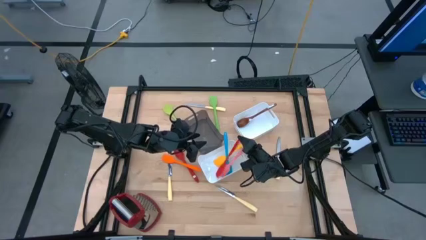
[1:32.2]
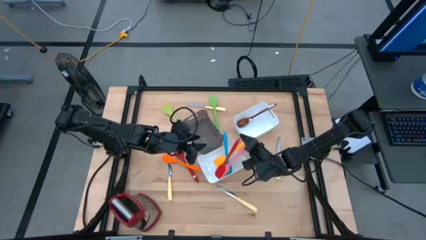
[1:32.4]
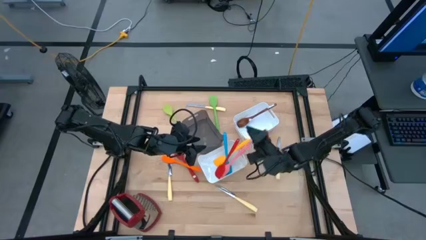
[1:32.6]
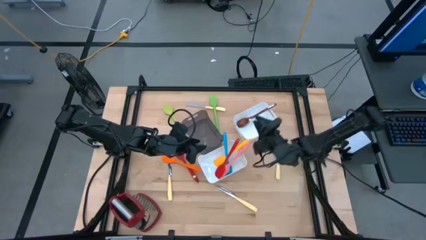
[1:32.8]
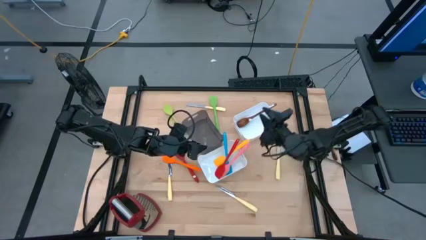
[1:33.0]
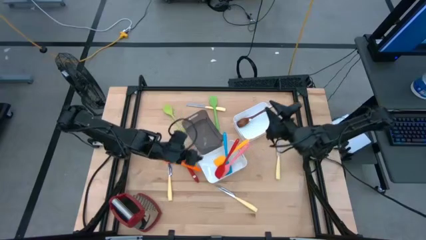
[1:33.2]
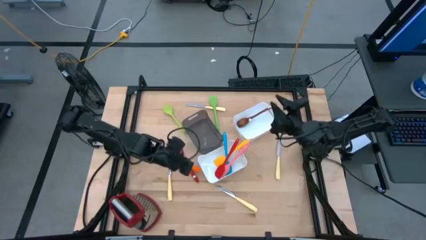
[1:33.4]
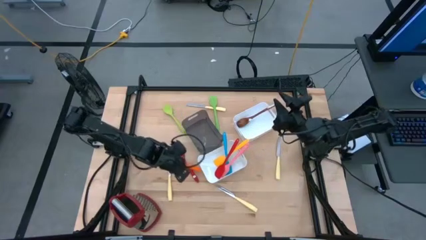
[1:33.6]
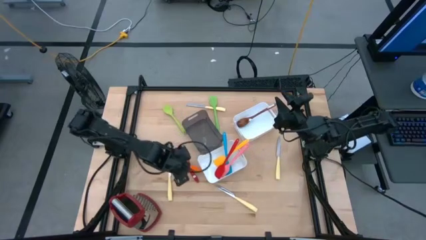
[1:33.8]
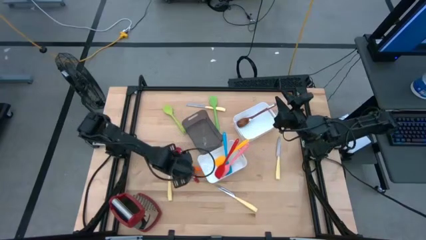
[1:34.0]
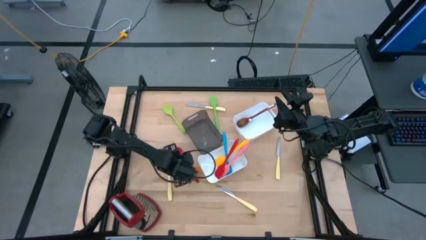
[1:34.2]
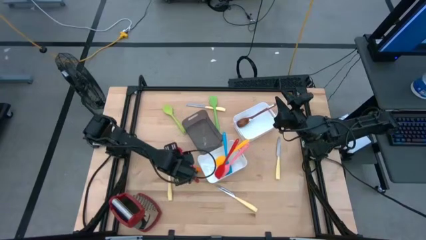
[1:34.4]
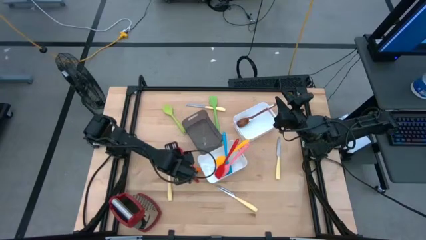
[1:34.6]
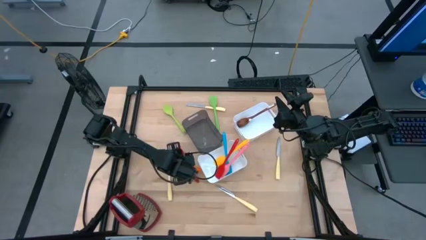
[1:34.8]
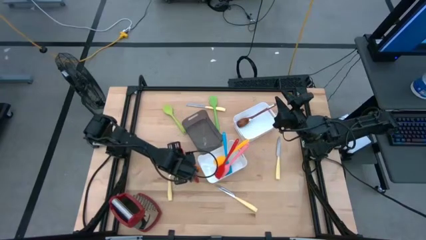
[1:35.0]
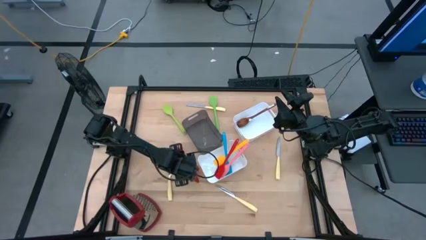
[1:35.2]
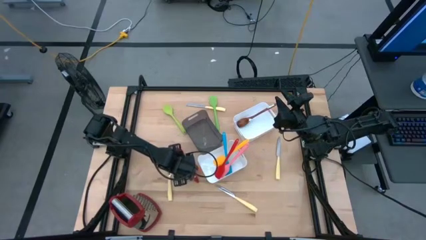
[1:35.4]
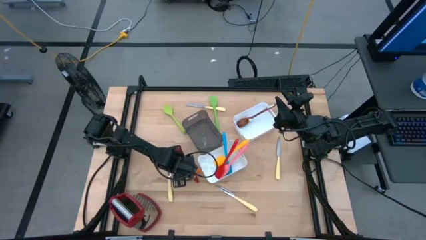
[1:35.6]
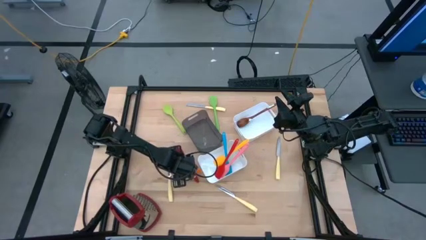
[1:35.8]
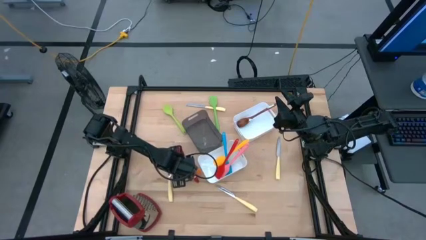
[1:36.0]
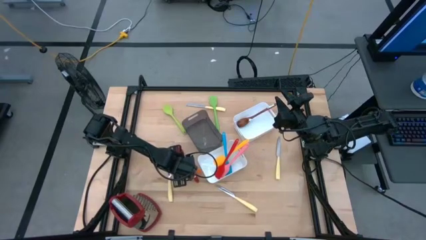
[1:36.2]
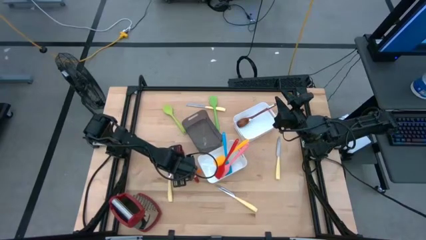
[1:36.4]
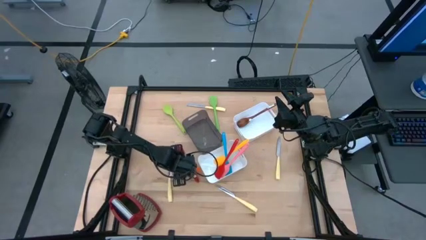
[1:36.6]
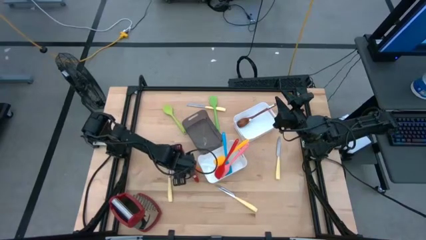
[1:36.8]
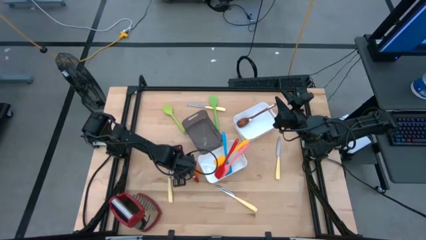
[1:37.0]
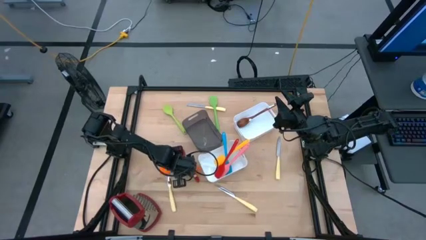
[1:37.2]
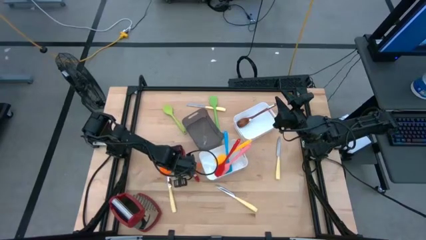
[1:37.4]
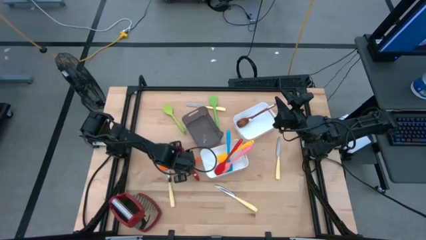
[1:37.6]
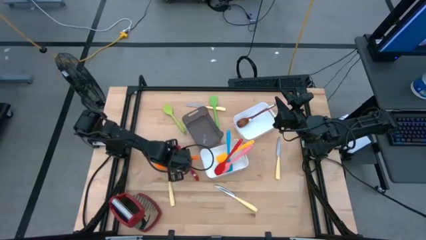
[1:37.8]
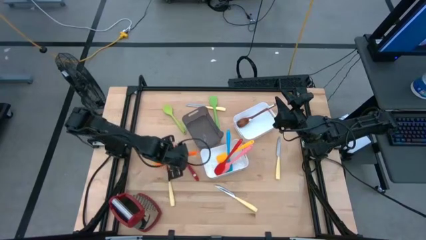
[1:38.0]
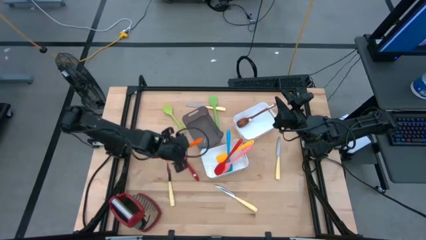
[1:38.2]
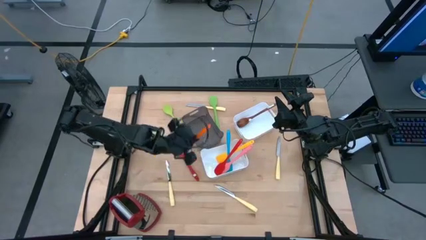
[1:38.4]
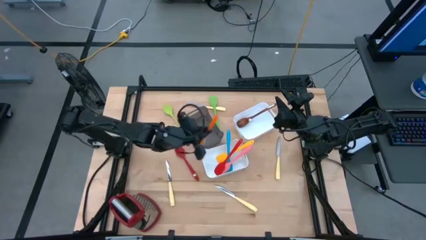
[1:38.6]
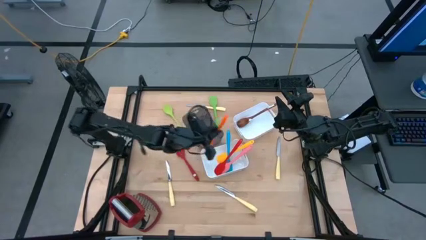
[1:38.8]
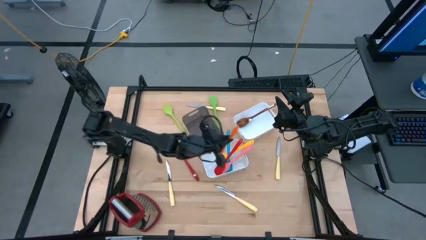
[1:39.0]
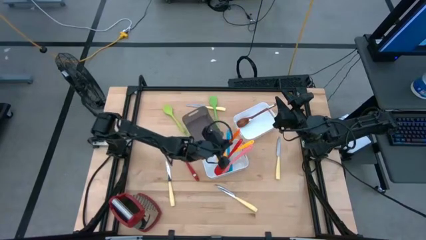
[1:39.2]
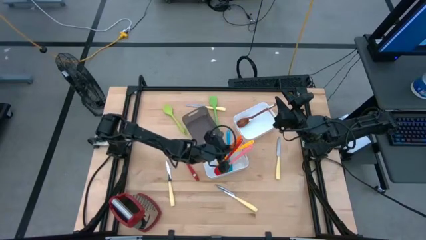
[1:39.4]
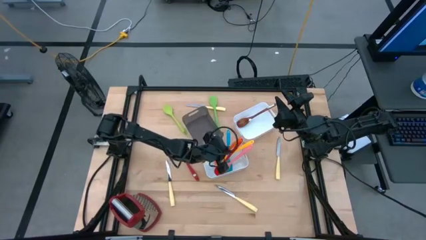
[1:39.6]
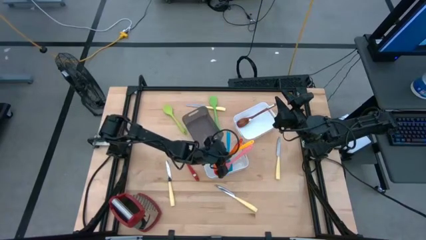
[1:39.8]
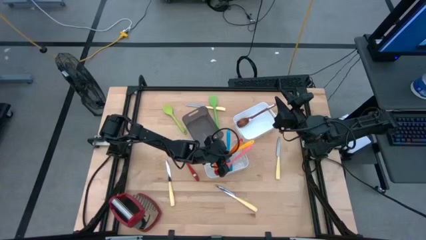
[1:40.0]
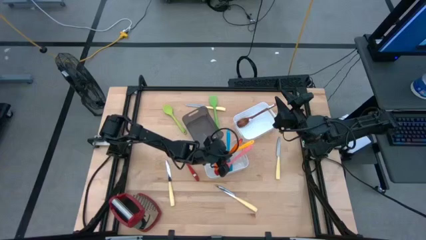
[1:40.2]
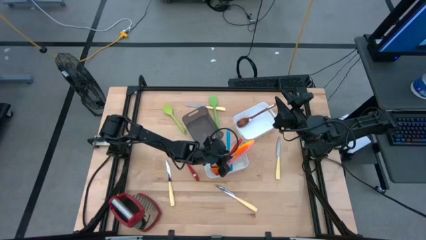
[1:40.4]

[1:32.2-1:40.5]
Task: Pick & Place Kitchen Items
Put the orange spatula into the bottom white bin

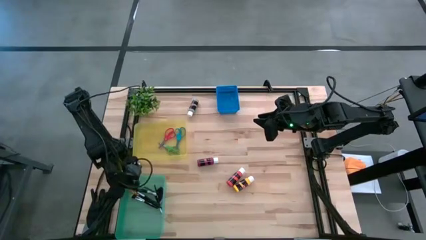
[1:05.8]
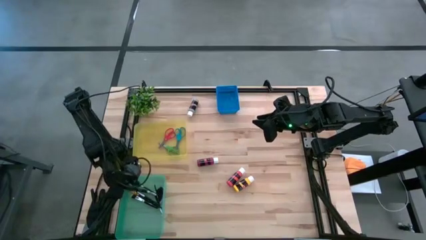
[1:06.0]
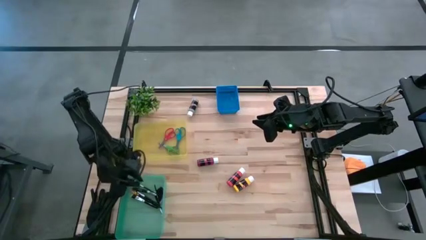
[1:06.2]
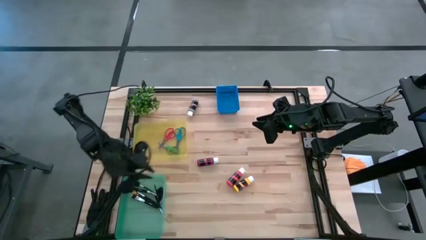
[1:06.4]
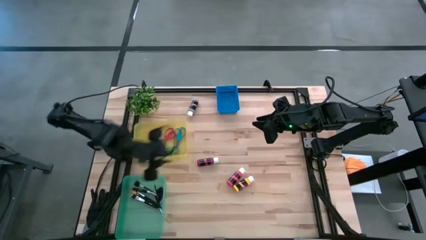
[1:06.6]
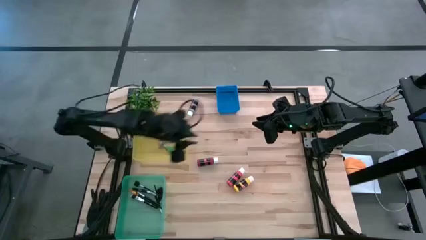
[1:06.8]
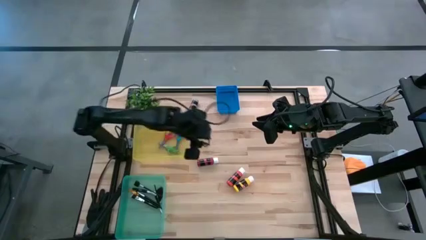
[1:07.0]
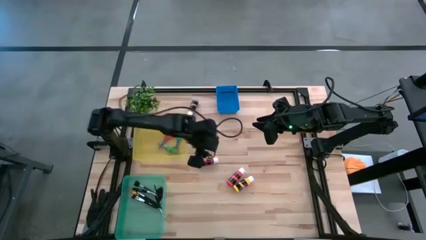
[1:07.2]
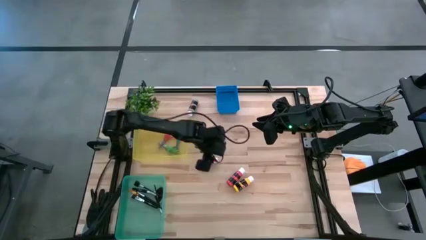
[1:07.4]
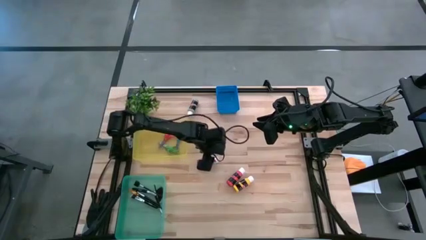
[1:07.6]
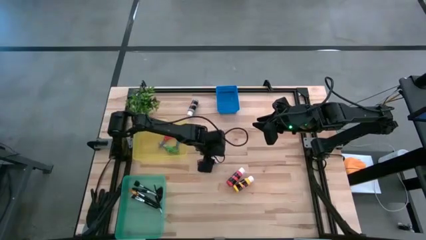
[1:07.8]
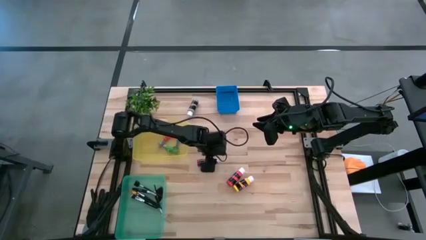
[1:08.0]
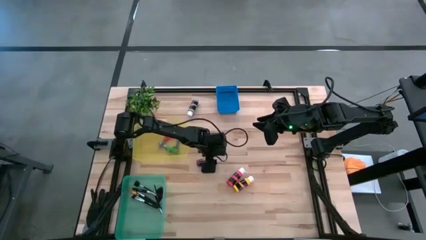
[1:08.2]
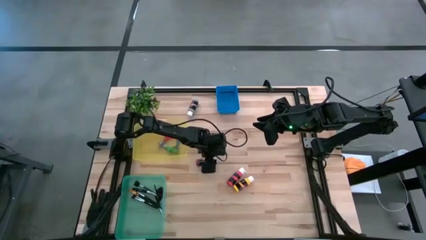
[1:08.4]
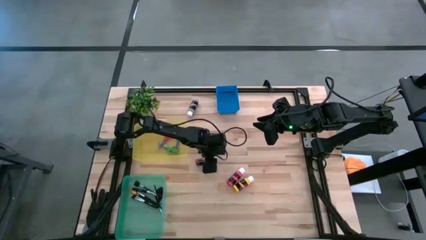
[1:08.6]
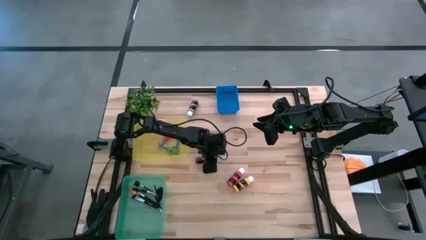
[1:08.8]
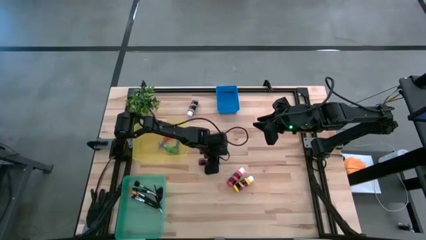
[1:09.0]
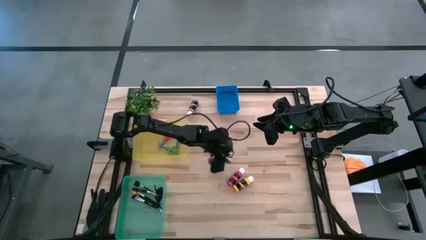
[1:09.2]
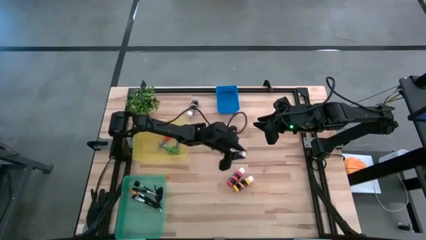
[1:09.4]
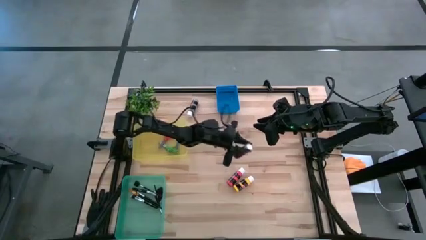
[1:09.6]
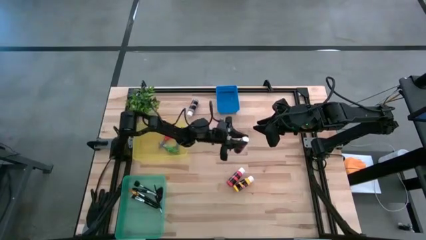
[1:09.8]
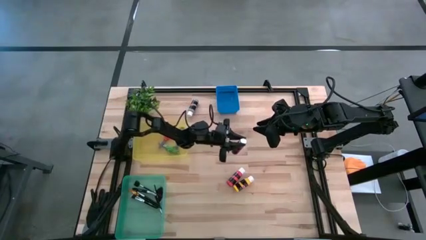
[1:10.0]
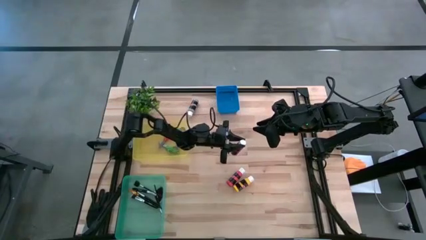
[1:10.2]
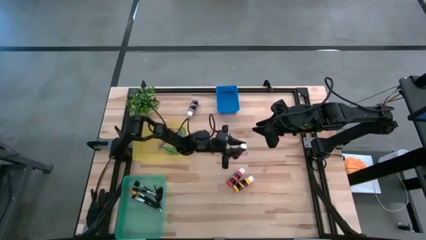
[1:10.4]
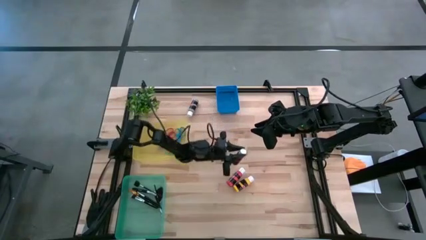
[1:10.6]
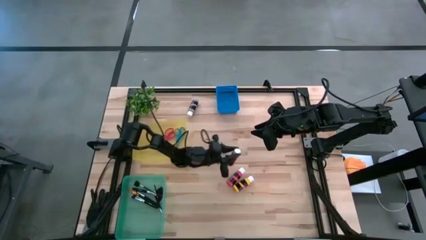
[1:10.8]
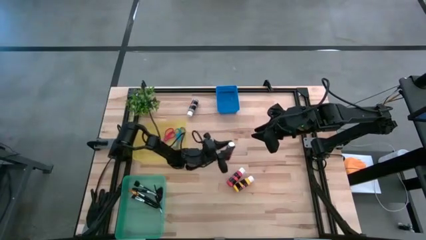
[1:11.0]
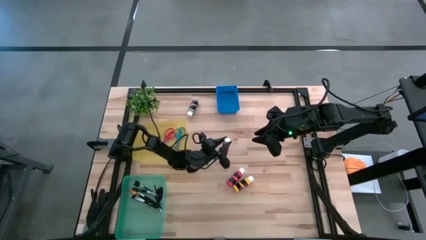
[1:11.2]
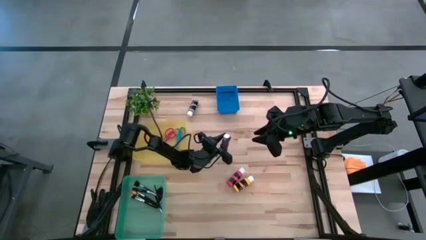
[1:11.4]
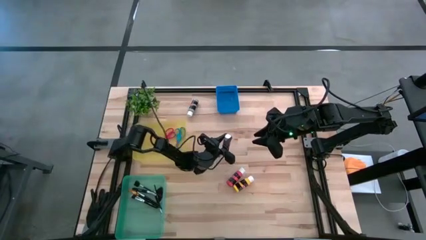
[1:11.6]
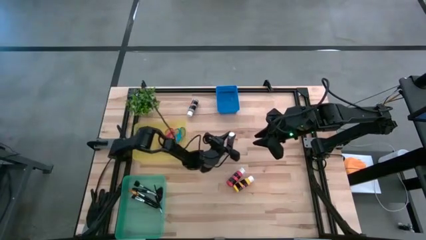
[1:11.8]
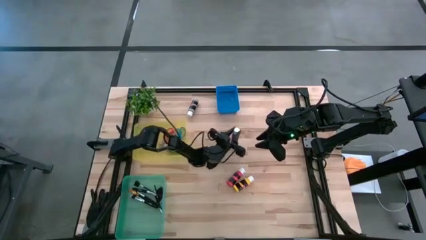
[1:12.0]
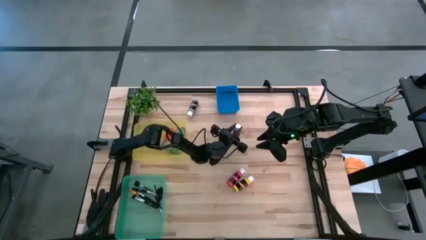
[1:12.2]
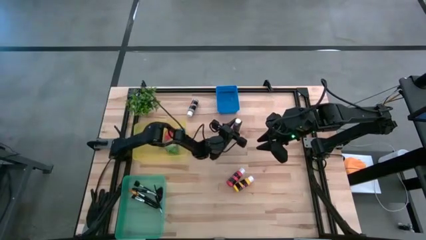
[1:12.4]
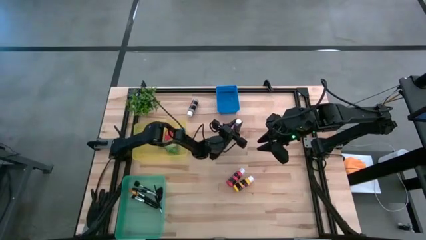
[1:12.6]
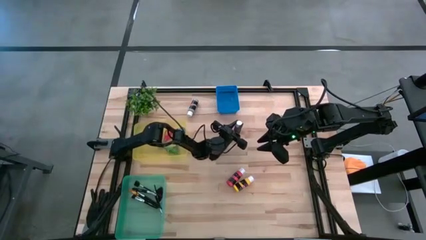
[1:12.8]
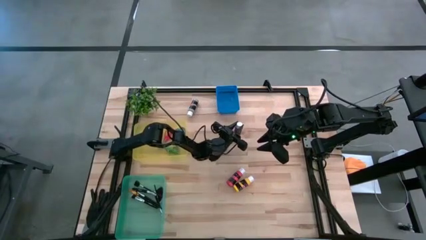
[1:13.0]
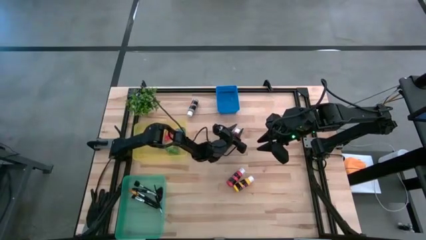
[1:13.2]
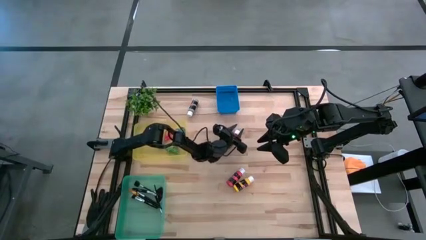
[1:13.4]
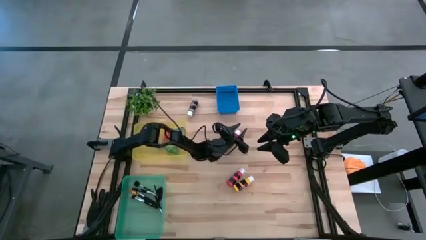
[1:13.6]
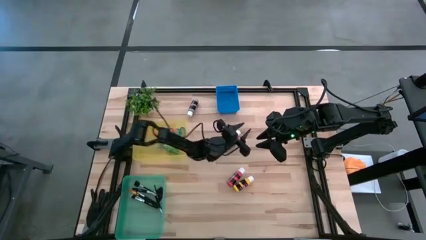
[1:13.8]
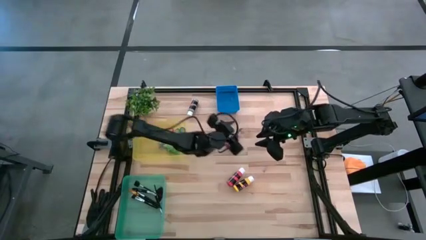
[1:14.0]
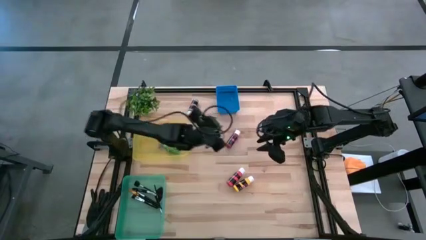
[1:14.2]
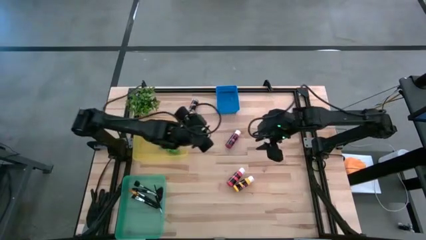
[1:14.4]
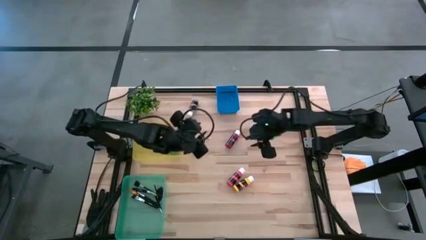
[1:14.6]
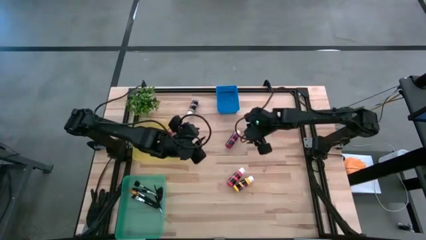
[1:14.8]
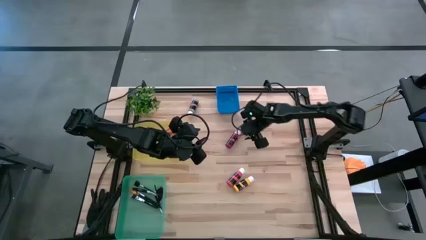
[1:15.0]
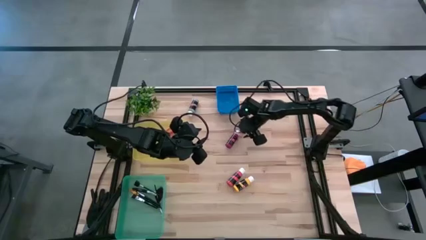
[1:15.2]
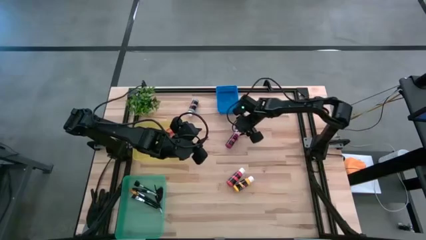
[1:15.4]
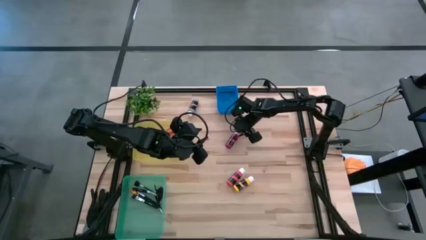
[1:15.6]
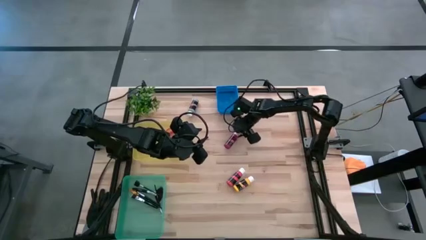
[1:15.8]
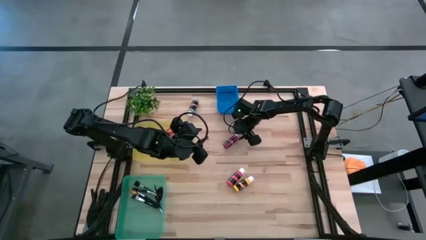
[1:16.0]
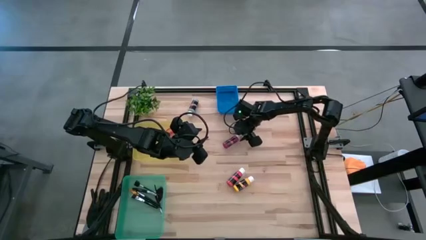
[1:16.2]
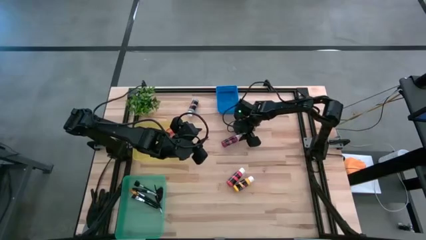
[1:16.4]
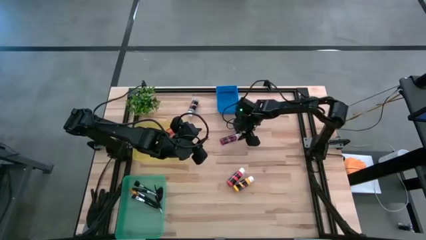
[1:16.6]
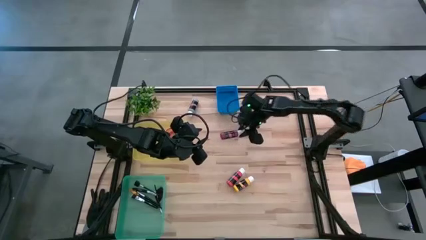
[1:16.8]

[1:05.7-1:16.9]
Task: Pick & Place Paint Supplies
Put the red paint bottle into the blue bin
